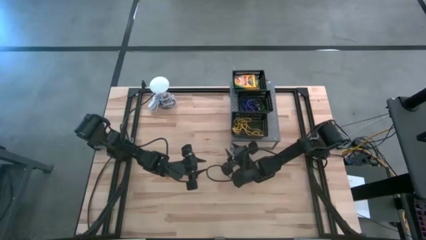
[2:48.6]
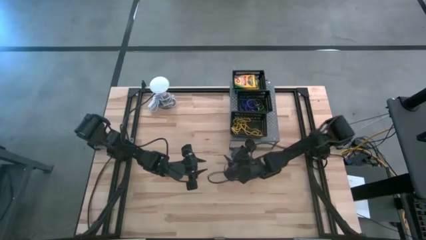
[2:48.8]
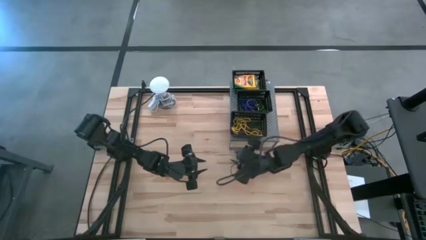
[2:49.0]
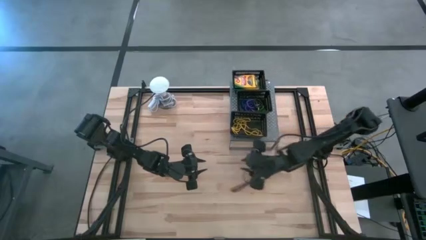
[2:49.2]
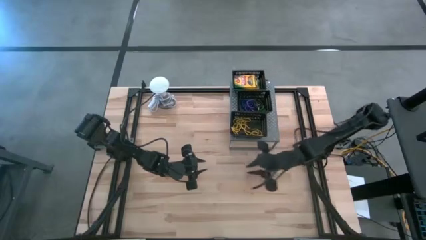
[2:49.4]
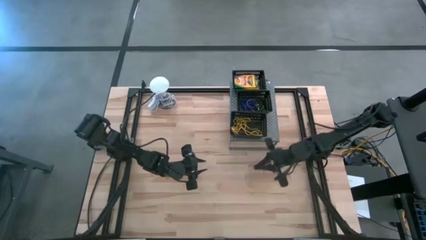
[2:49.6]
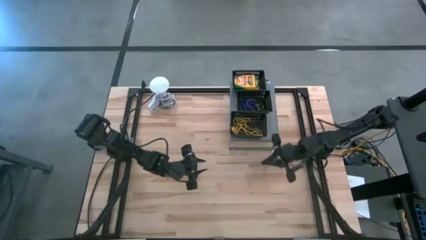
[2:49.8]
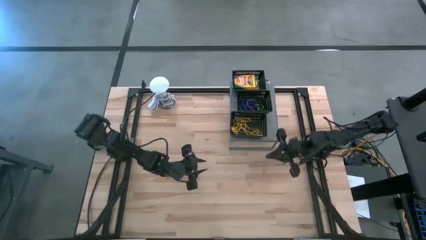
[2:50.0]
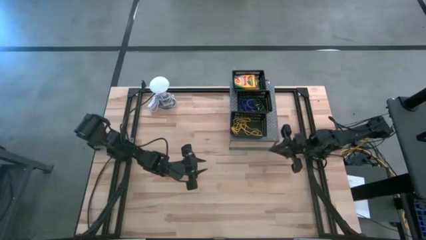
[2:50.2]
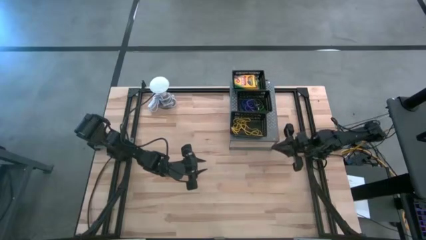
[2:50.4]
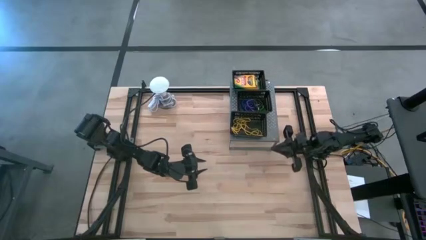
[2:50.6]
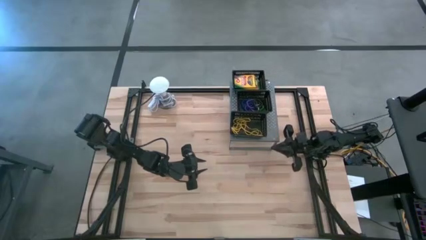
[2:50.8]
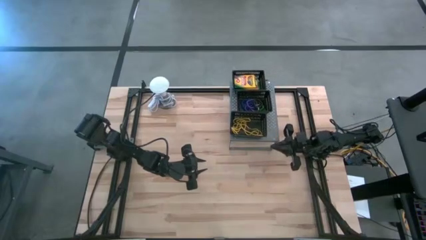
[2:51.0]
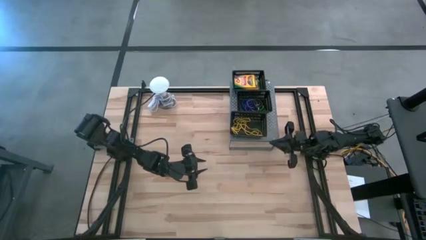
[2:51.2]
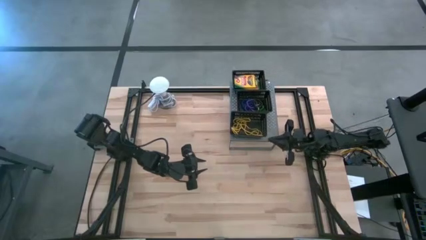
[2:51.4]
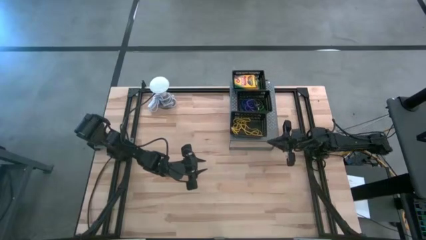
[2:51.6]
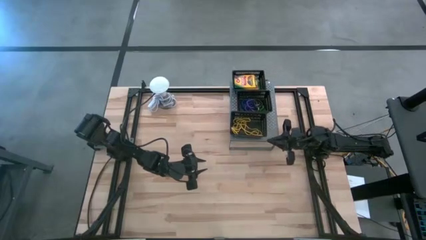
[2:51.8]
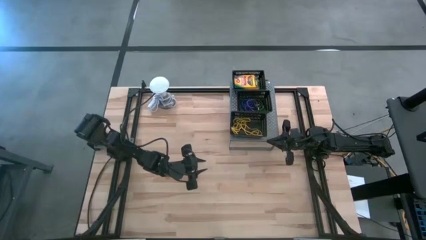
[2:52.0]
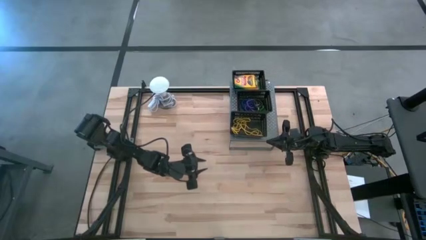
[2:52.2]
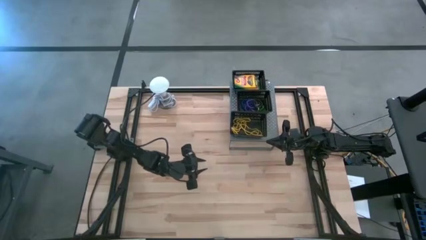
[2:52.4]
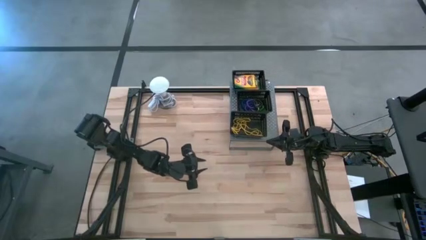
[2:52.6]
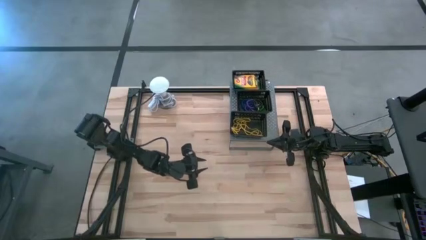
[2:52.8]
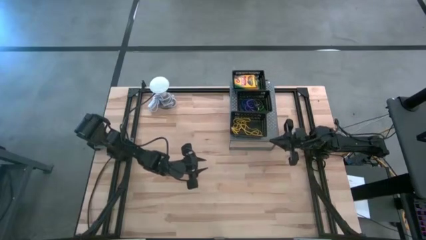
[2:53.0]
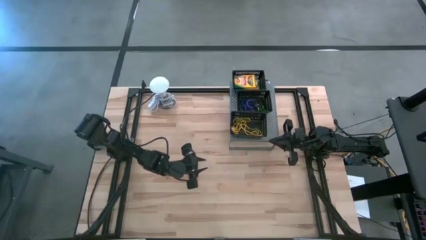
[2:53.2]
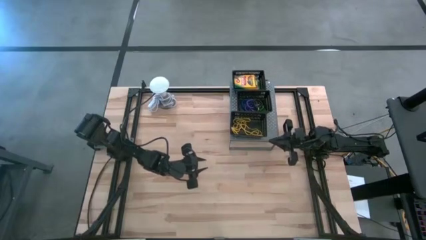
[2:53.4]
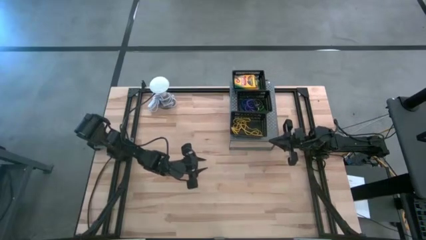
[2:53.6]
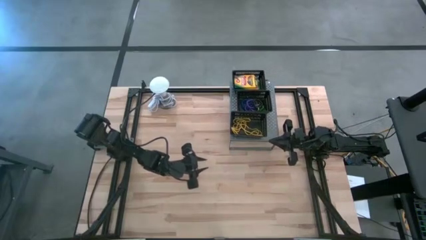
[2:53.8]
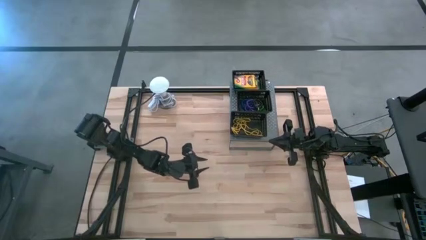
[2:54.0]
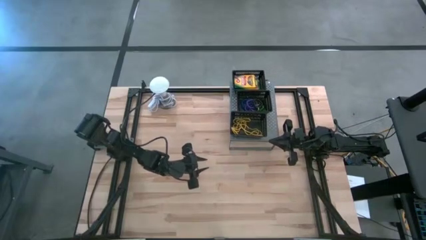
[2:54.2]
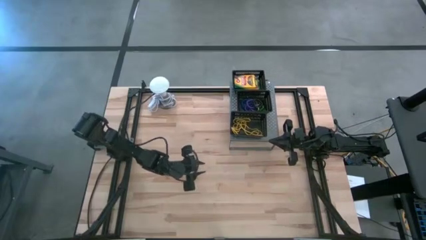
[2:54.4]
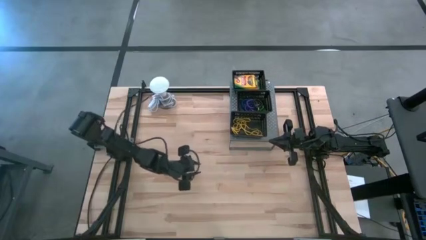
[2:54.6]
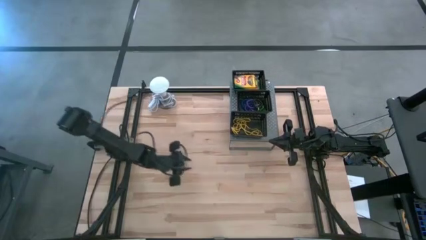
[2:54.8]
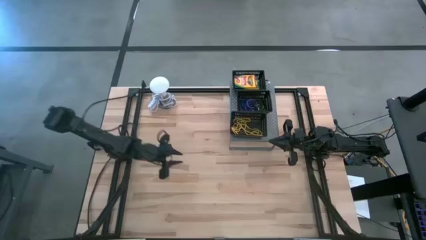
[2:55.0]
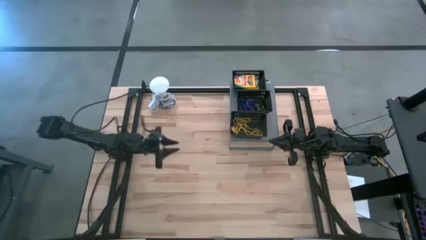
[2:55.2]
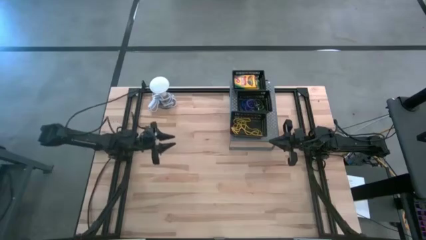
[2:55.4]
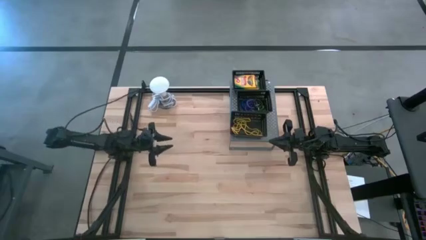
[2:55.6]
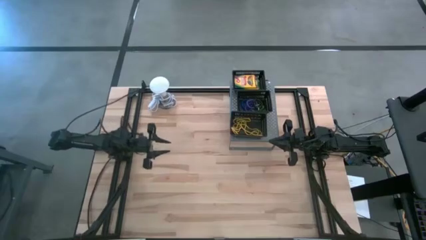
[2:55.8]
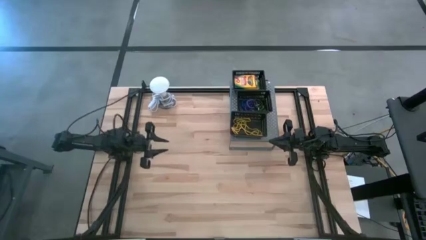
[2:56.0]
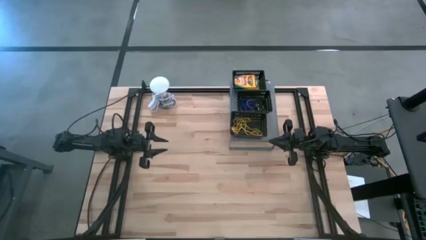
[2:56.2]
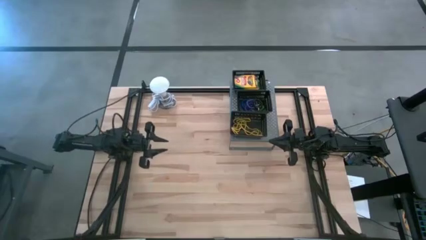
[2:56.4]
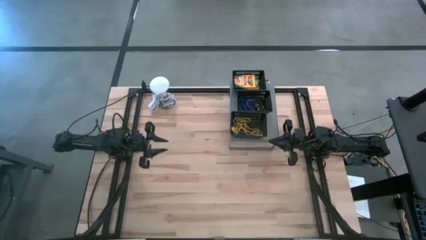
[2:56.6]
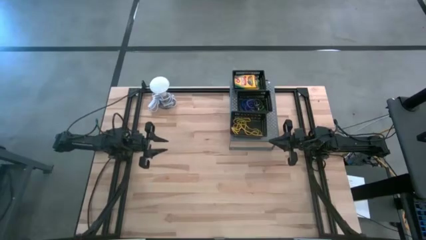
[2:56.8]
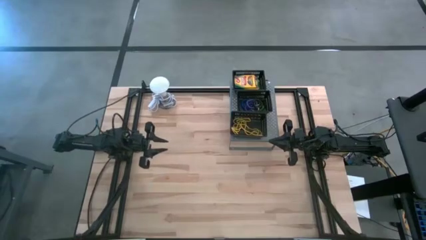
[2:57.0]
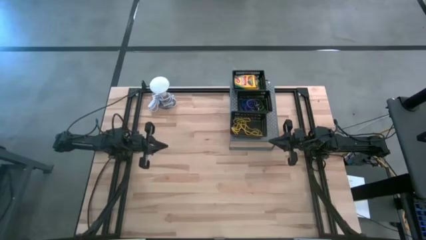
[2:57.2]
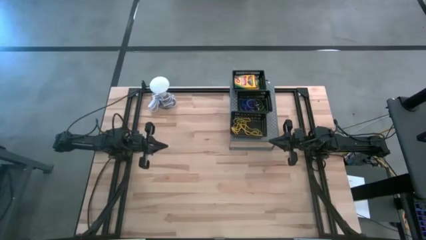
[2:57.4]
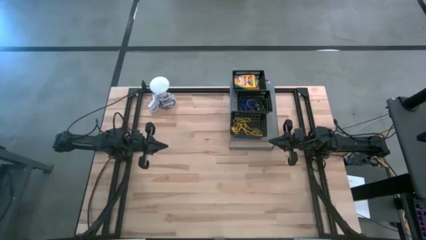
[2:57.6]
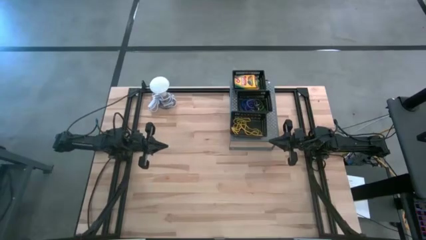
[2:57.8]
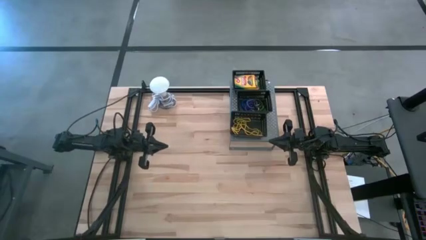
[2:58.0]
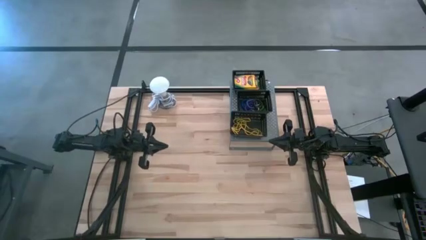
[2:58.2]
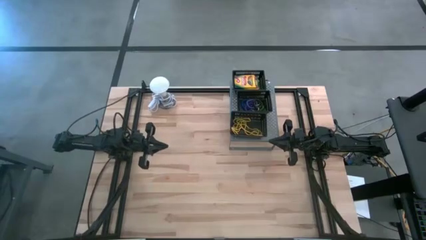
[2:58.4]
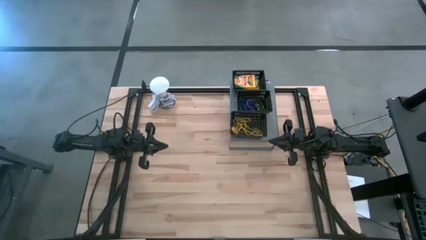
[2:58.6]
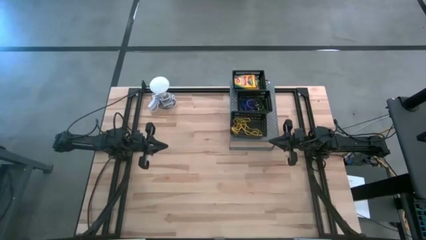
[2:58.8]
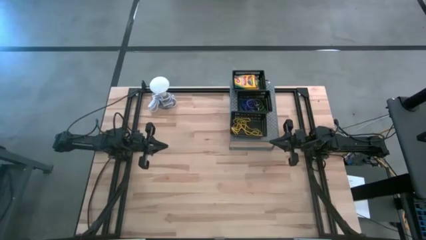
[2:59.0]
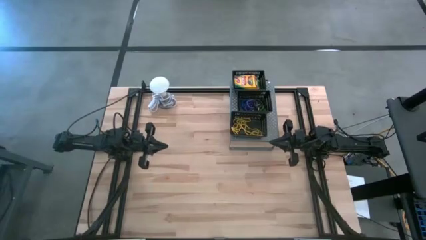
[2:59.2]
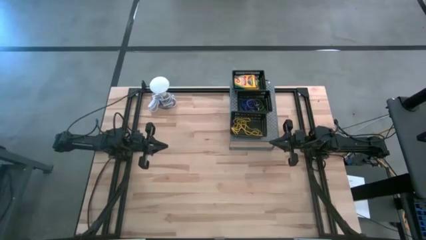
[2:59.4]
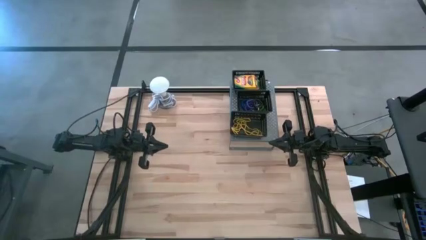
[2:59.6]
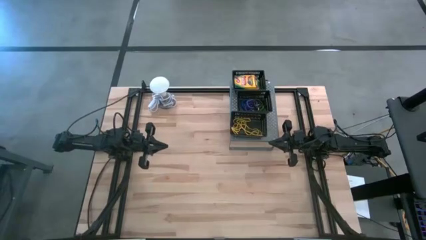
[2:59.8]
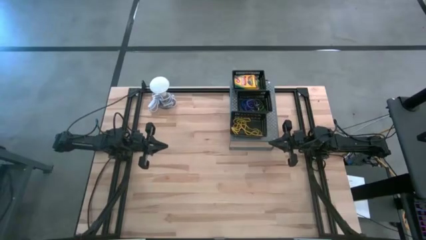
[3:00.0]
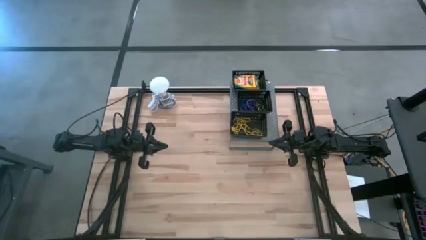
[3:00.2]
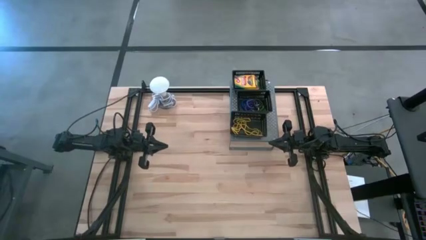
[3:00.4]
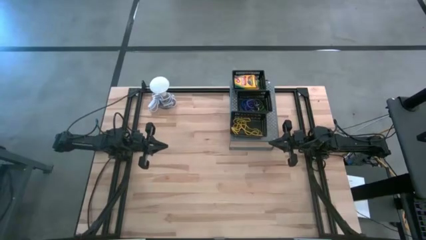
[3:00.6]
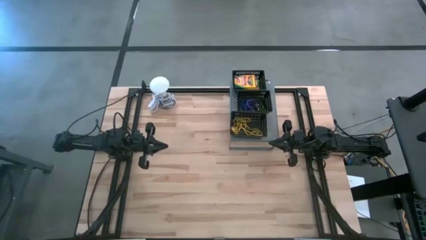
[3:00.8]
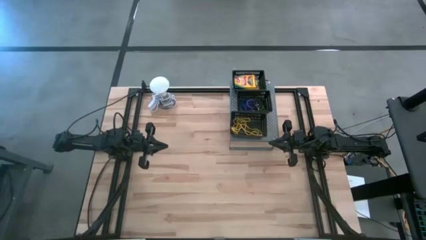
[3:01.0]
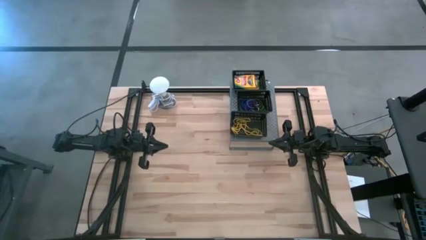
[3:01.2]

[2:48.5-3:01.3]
Task: Pick & Place Office Desk Supplies
Return to Home Position

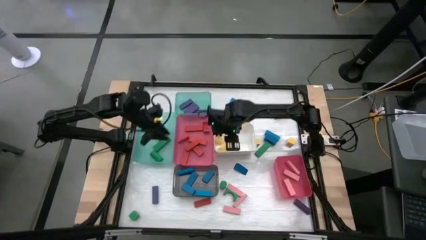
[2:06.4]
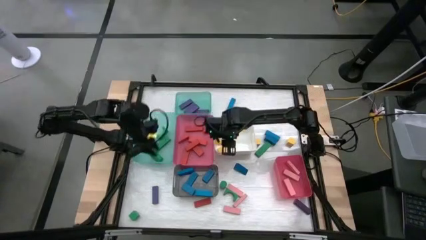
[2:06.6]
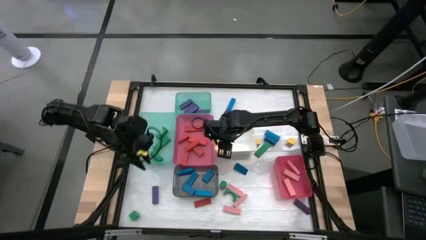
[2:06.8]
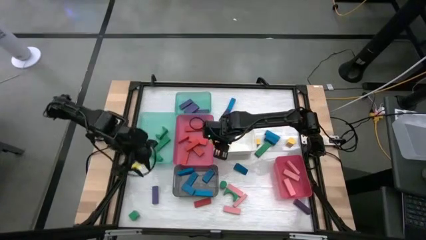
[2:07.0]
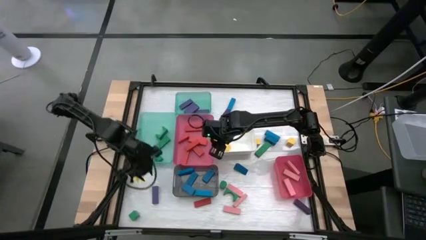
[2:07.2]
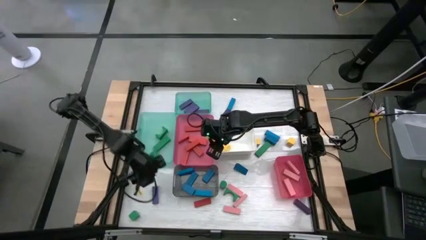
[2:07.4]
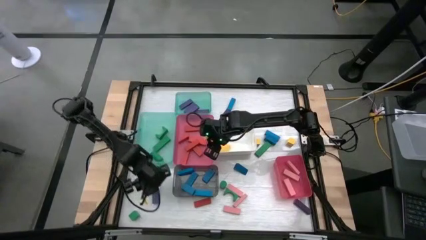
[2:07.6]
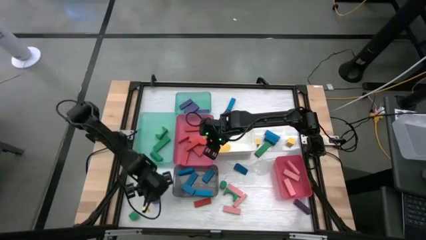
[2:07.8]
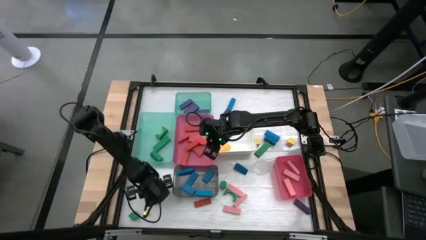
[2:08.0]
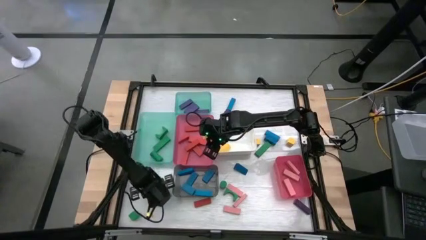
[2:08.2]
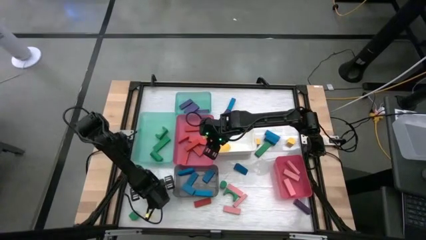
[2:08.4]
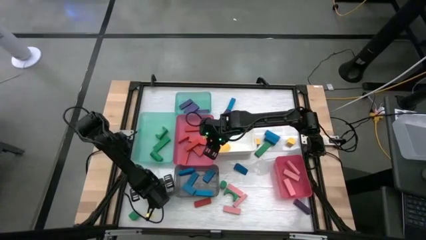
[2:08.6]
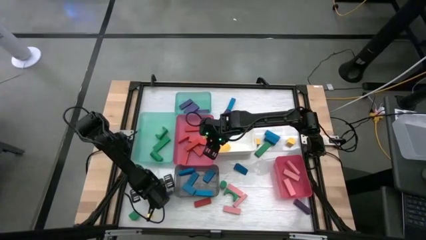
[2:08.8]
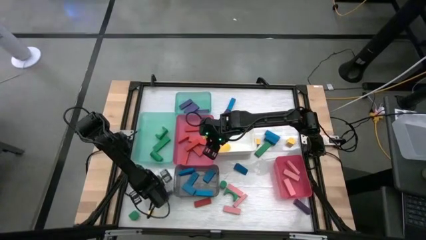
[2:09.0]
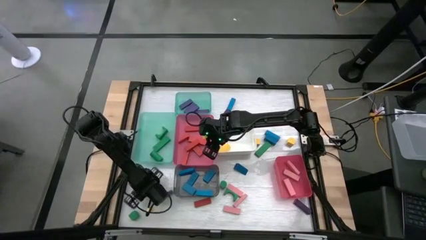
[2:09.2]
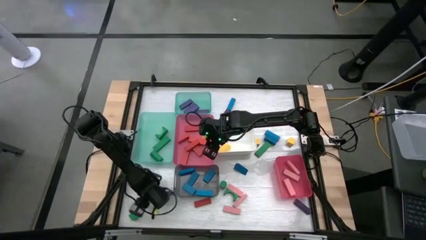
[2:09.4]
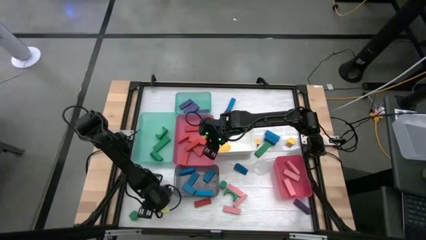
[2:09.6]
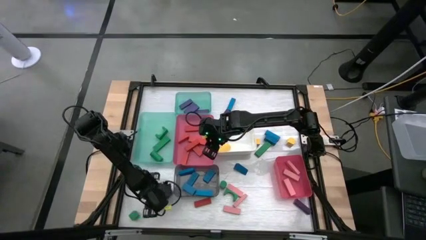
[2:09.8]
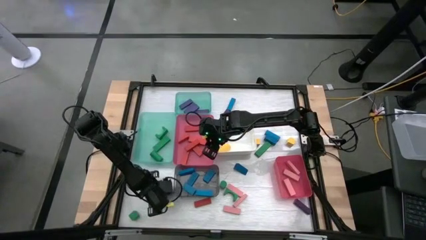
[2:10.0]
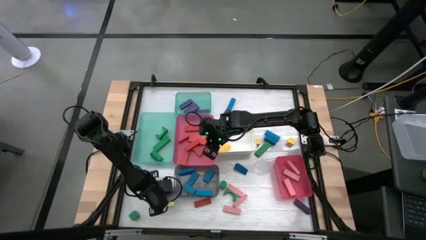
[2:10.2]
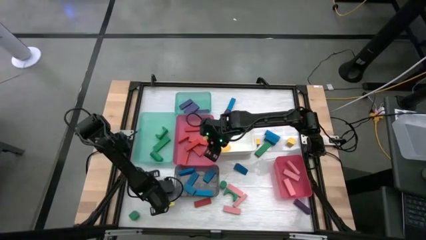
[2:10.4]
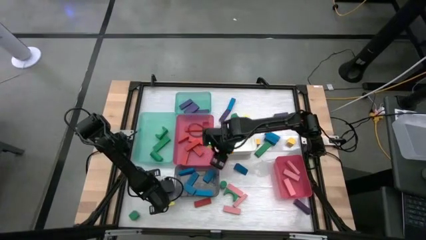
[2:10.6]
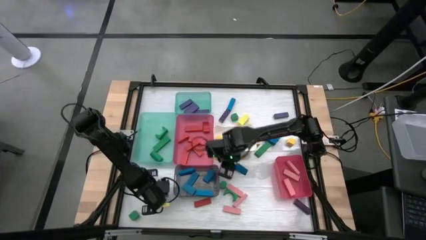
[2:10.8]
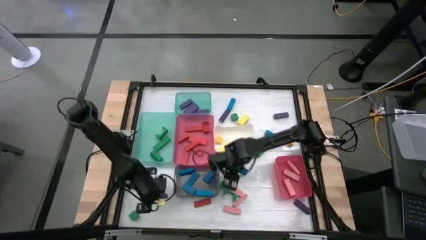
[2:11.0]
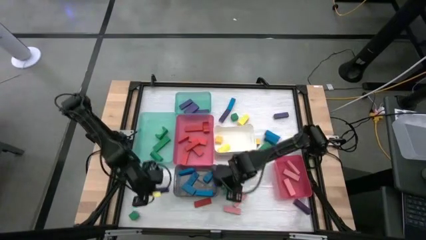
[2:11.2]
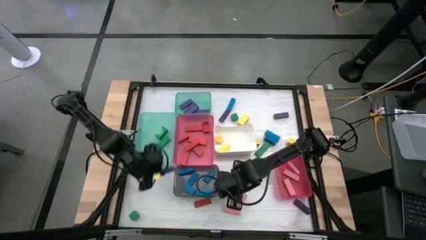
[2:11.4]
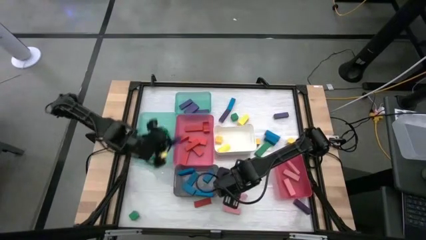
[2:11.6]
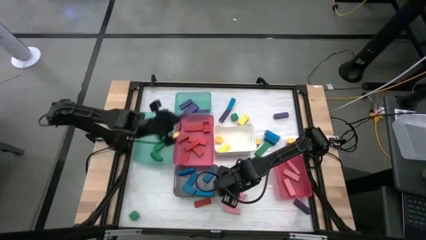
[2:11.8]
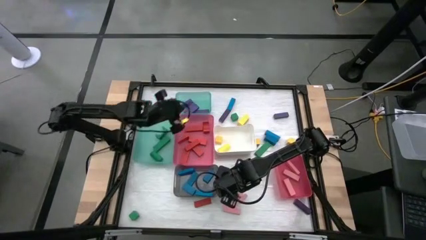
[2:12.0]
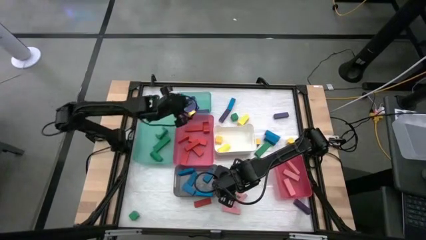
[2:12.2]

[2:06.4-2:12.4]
Task: Sort blocks
Put the violet block into the top green bin
